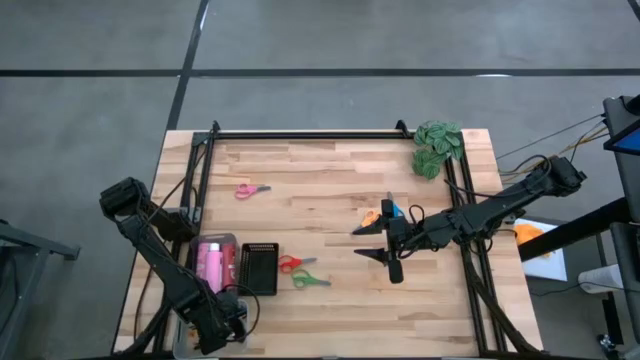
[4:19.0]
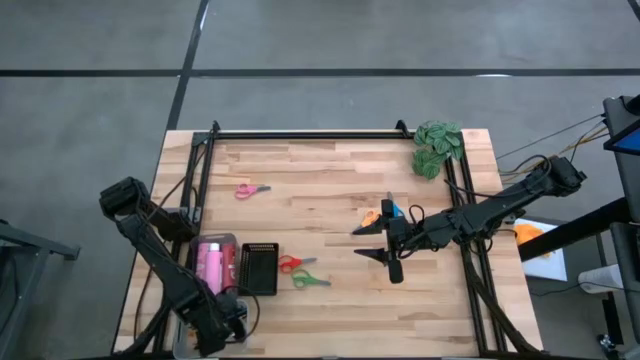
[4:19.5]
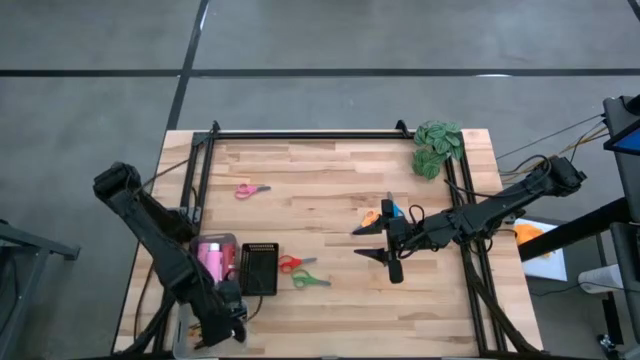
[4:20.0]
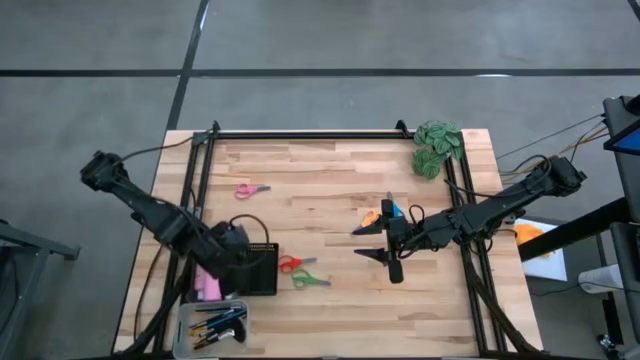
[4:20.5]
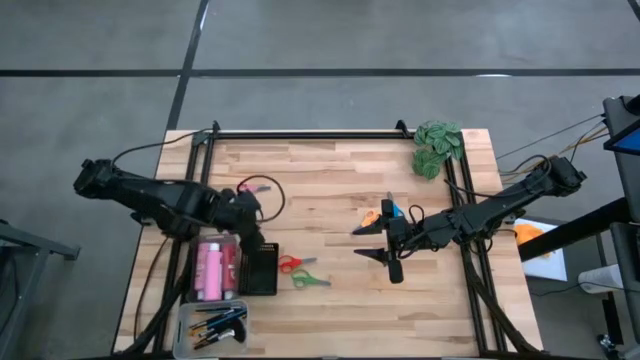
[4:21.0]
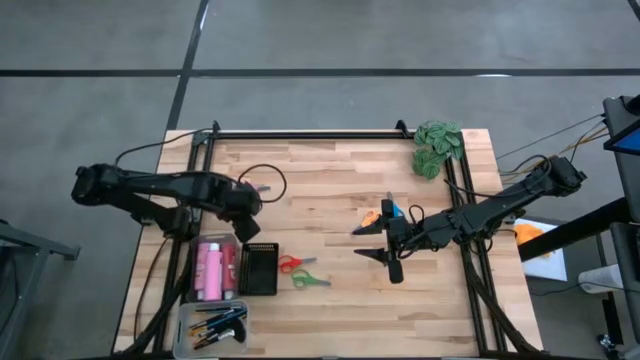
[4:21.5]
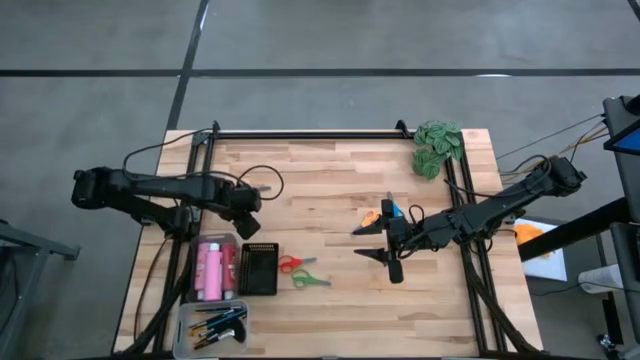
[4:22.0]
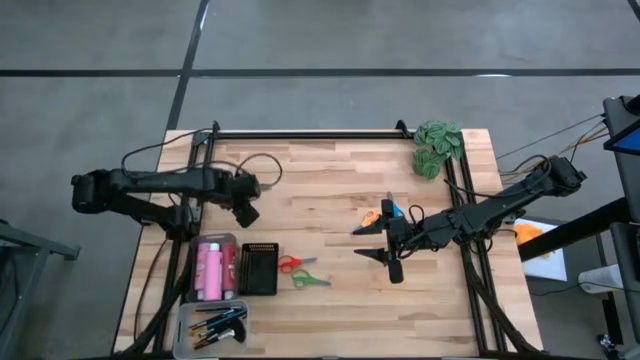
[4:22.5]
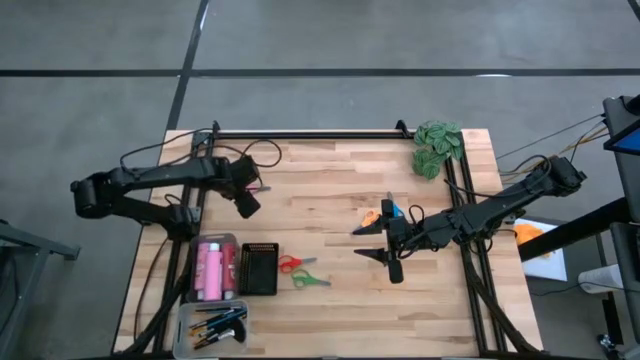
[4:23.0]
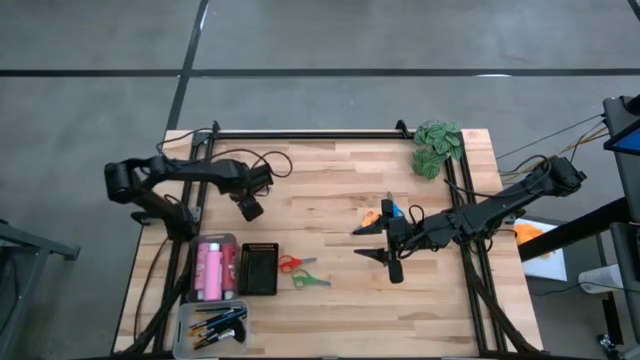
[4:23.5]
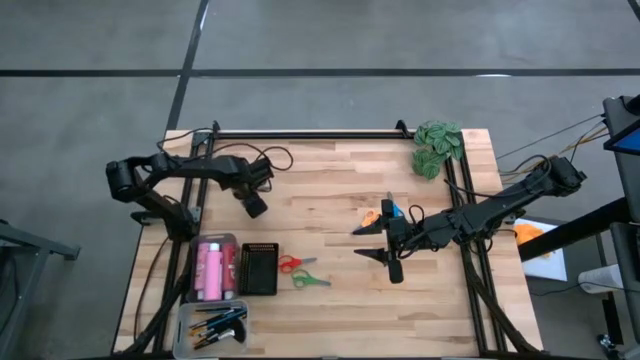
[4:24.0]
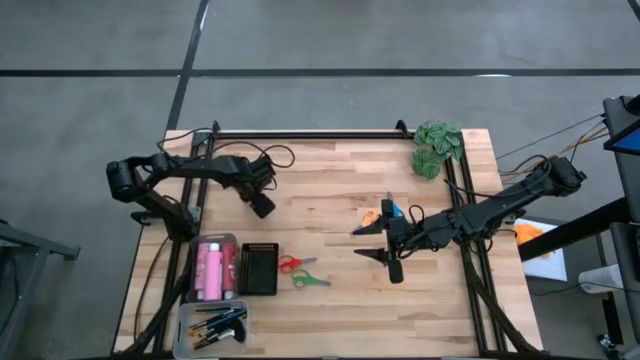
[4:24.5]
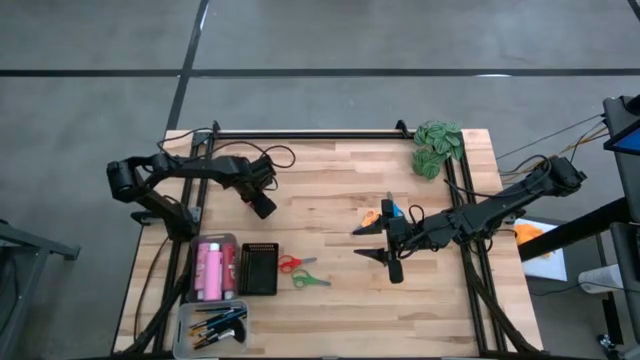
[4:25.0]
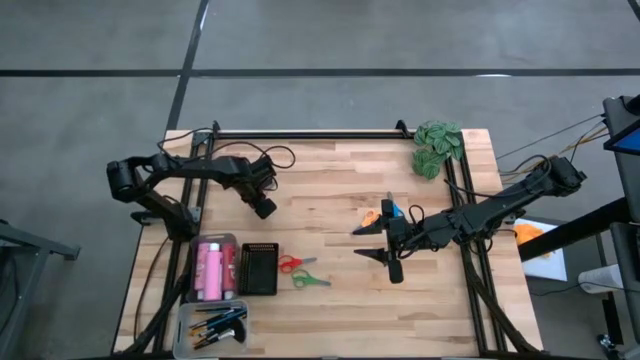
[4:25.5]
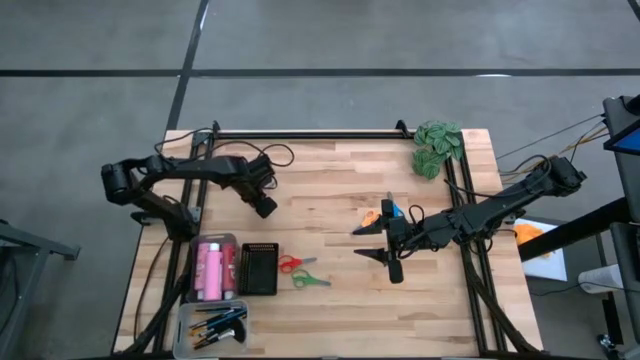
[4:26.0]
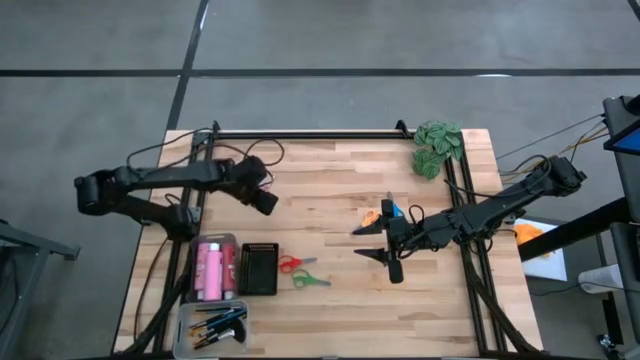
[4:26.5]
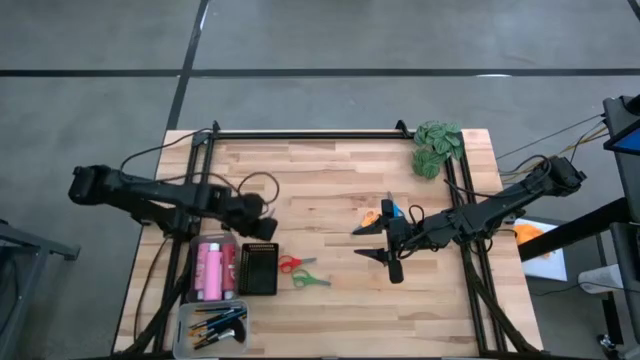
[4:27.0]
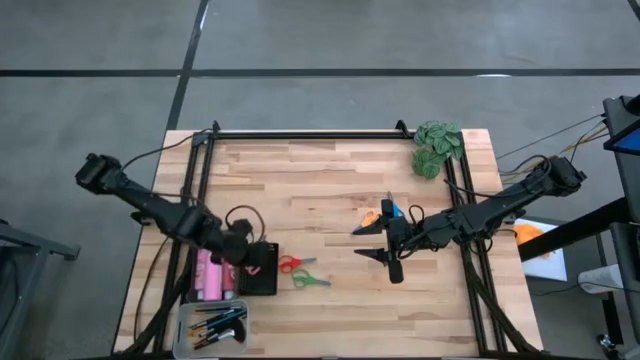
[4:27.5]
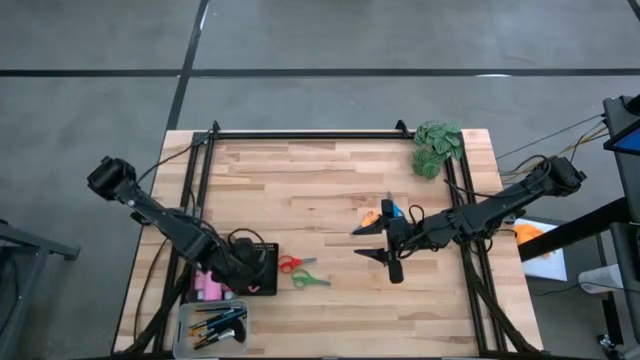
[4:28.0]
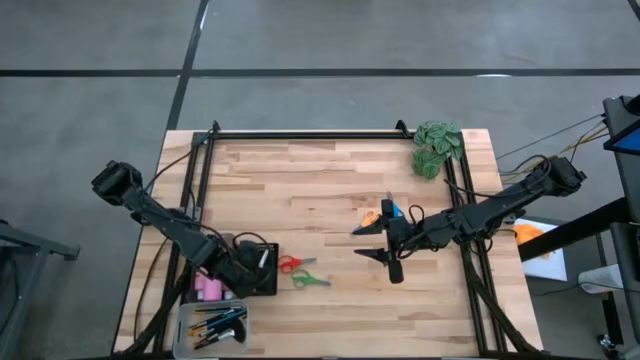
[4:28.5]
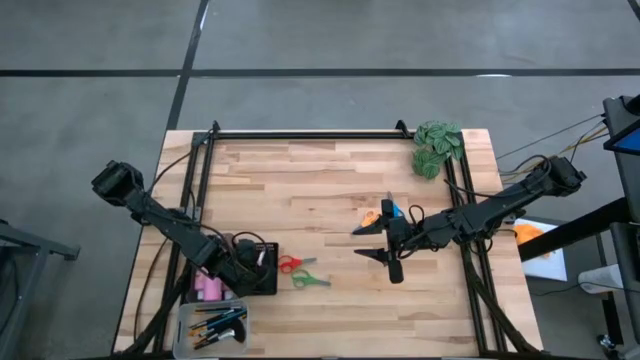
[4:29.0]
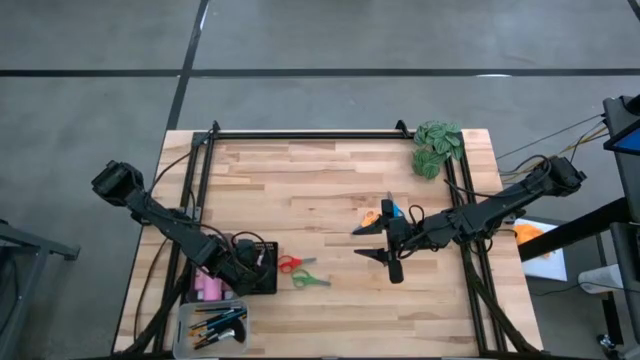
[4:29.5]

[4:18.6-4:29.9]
Task: Pick & Place Paint Supplies
Put the pink scissors into the black bin

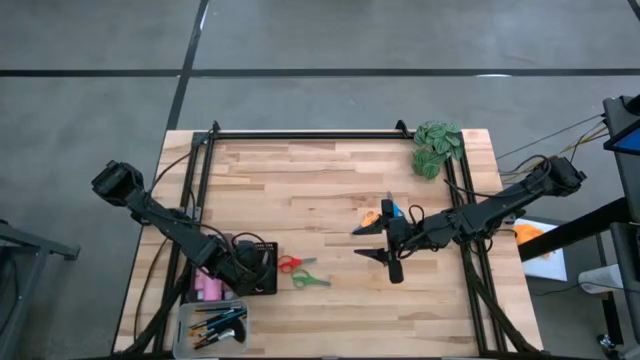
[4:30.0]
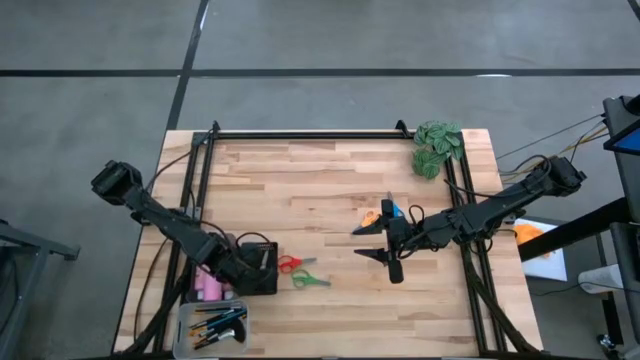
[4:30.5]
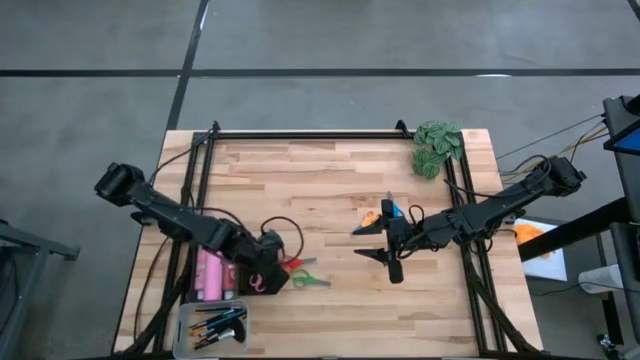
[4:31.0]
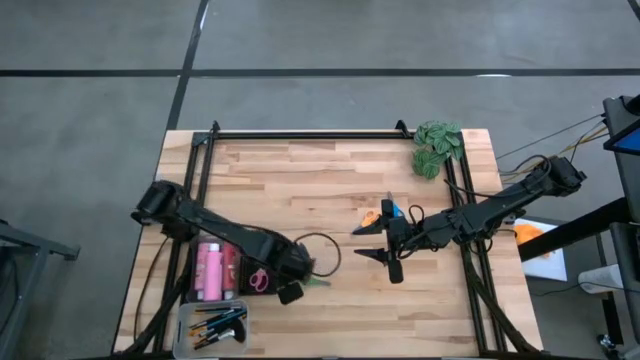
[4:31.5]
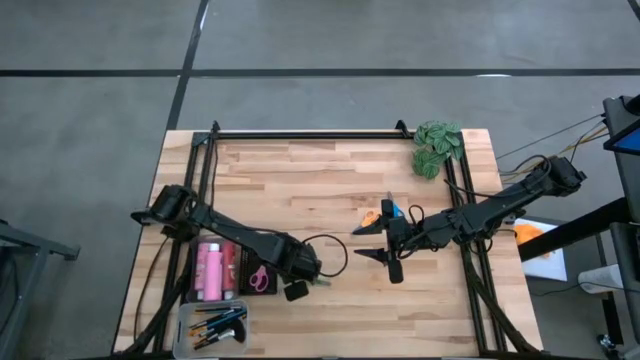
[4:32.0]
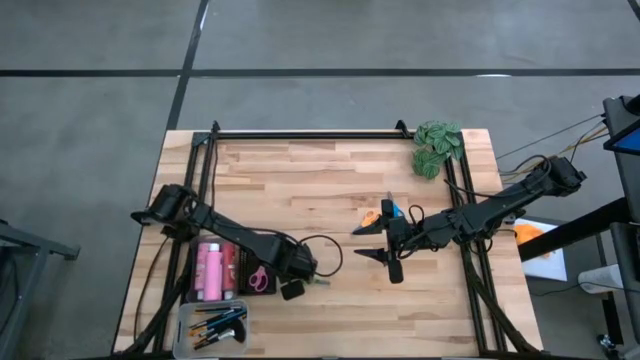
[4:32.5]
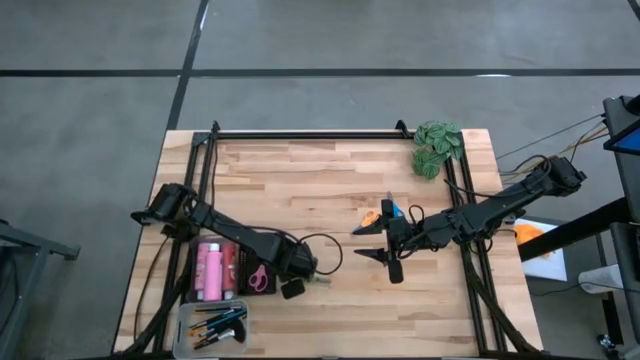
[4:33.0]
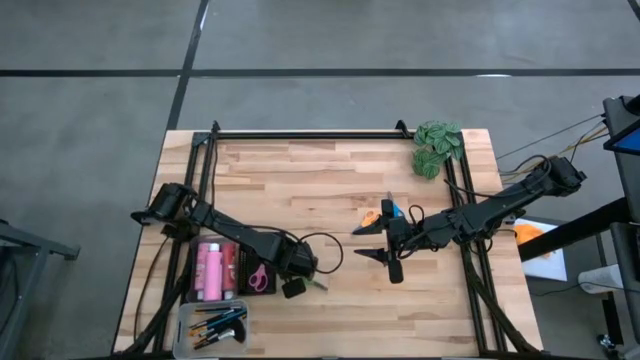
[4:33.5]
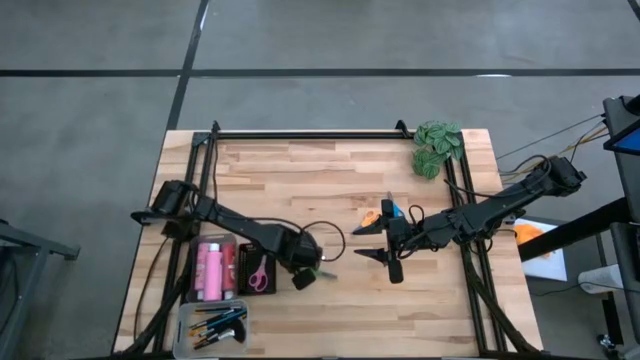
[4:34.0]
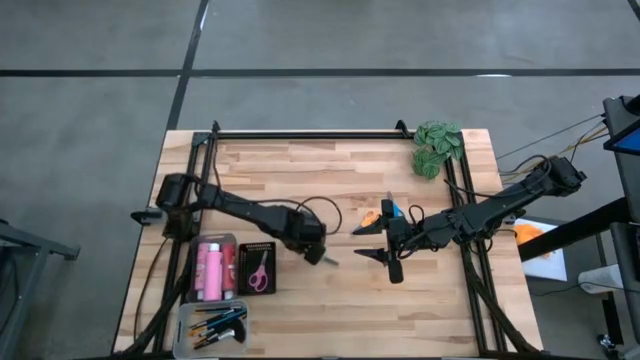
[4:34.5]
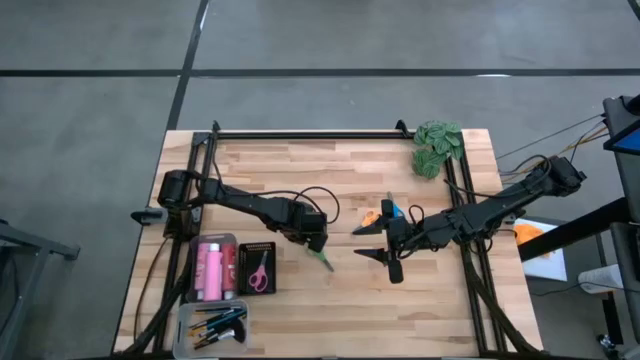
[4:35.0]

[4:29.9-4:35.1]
Put the orange scissors into the black bin

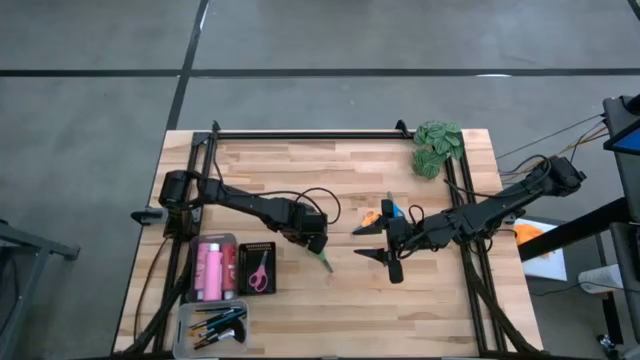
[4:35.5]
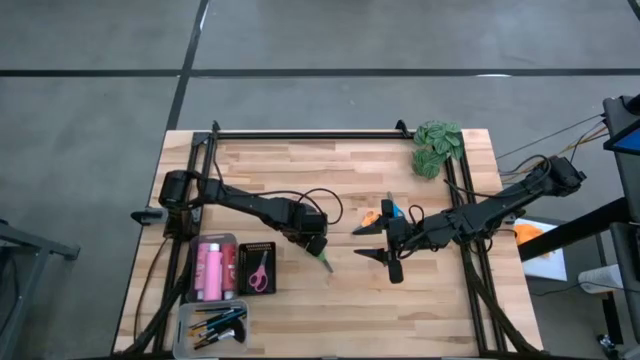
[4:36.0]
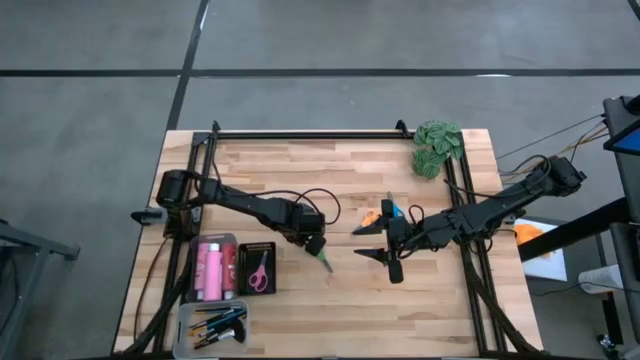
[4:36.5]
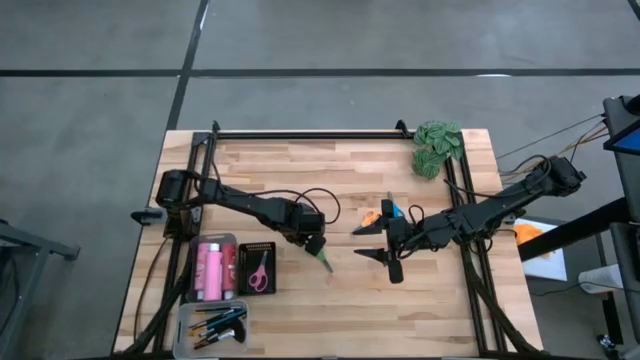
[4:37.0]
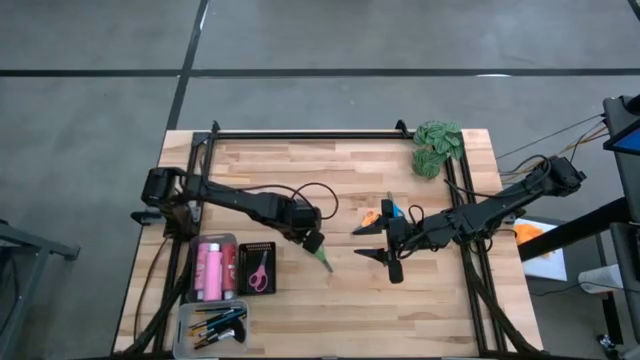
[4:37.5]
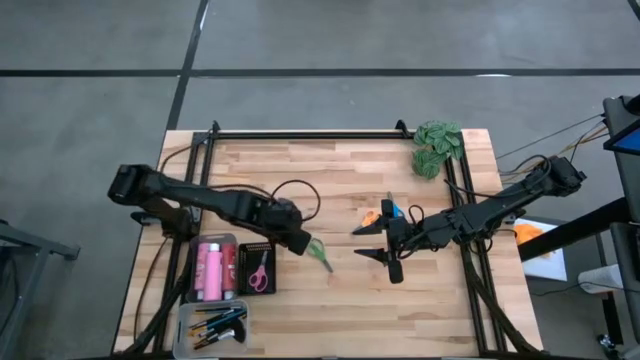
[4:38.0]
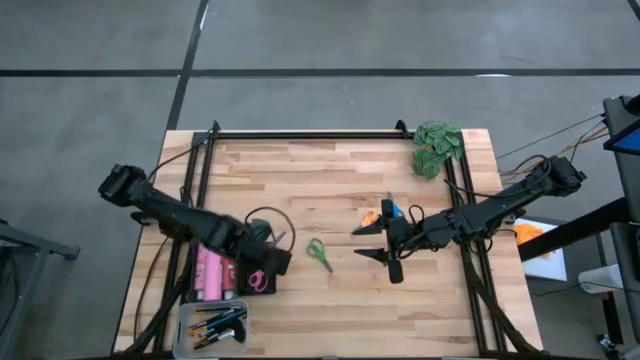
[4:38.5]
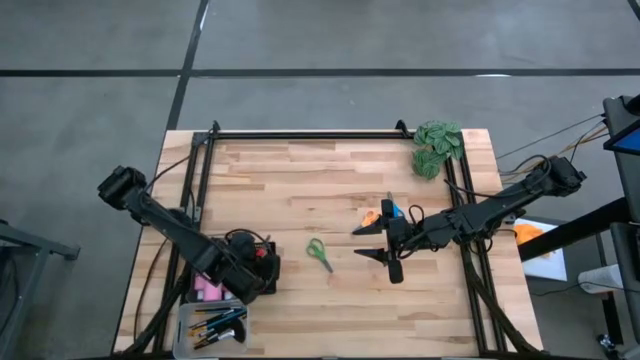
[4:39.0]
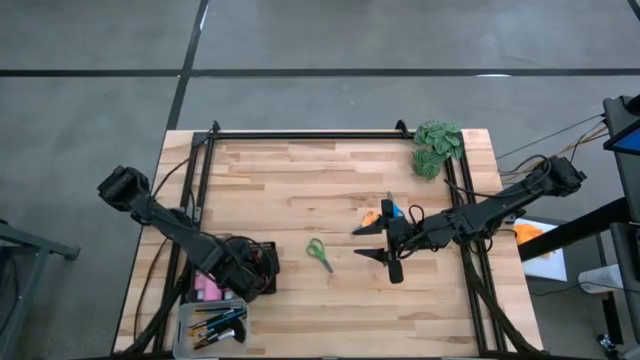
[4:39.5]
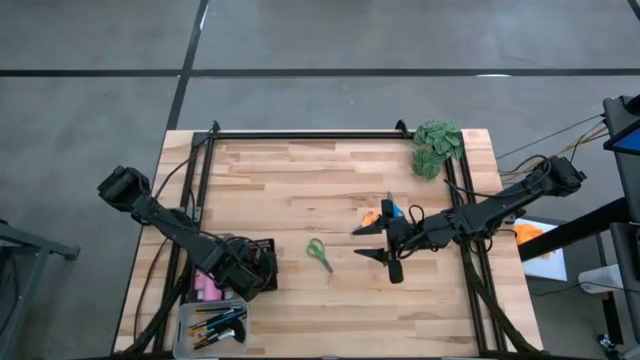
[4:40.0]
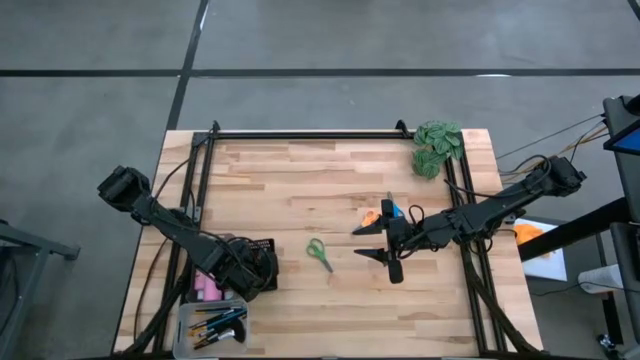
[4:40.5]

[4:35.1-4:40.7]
Put the orange scissors into the black bin

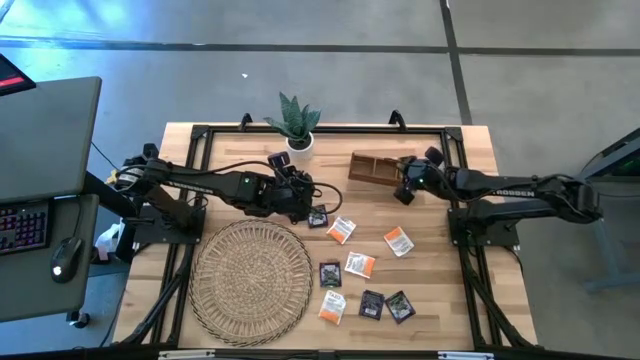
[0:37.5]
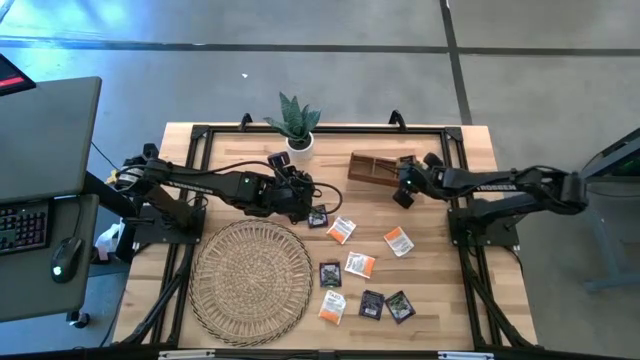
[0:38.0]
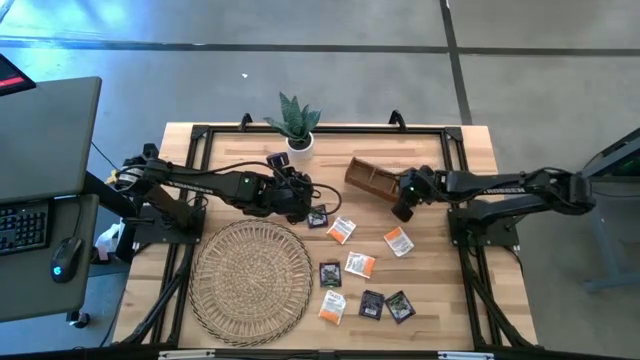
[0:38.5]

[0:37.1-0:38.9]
Task: Pick & Place Tea
Adjust the wooden organizer
